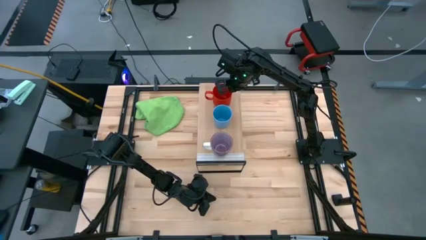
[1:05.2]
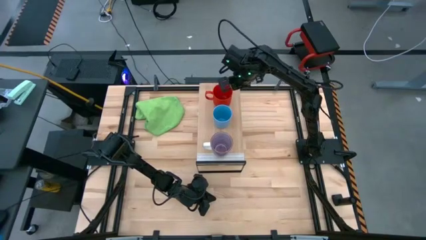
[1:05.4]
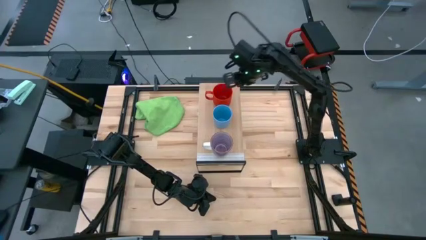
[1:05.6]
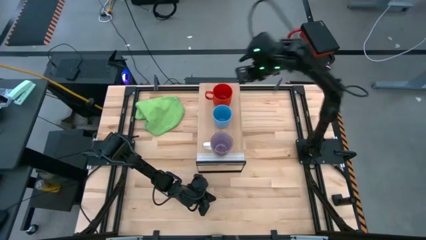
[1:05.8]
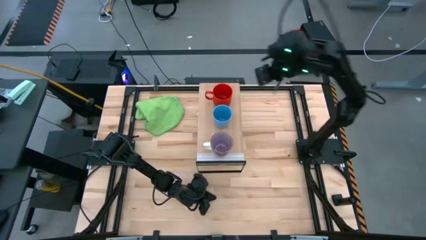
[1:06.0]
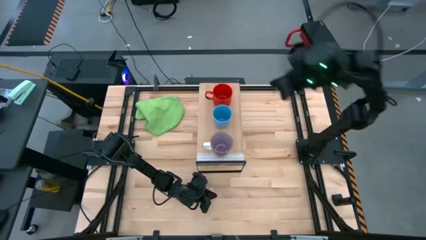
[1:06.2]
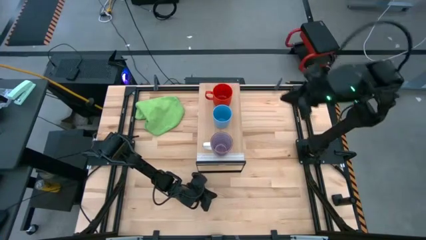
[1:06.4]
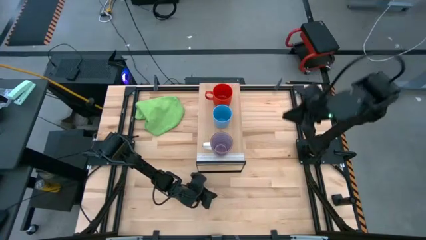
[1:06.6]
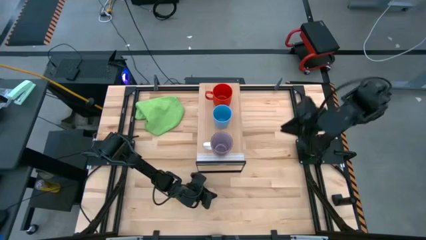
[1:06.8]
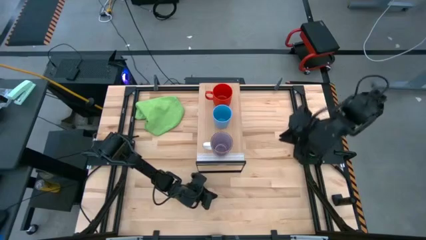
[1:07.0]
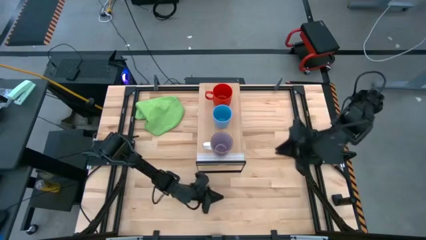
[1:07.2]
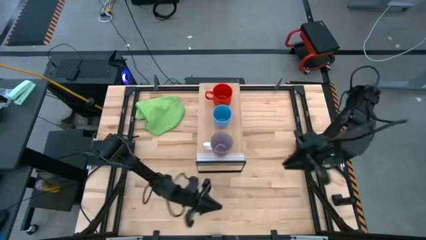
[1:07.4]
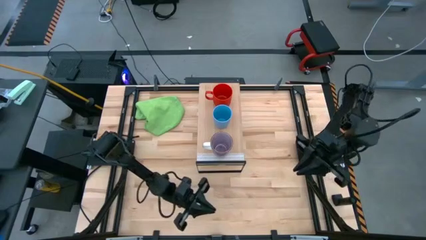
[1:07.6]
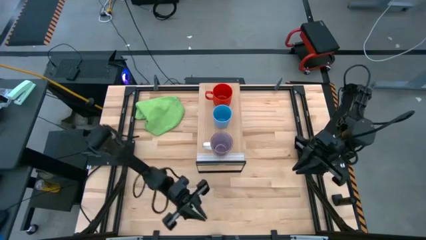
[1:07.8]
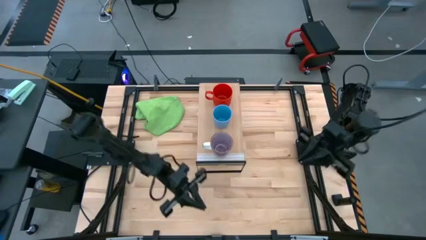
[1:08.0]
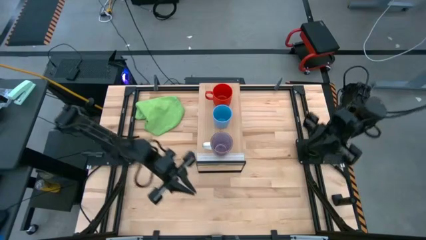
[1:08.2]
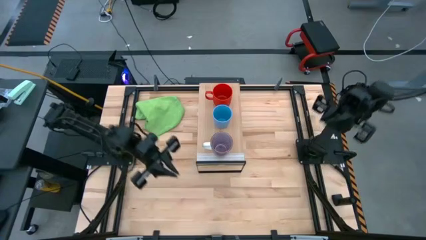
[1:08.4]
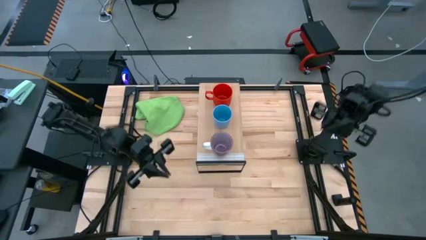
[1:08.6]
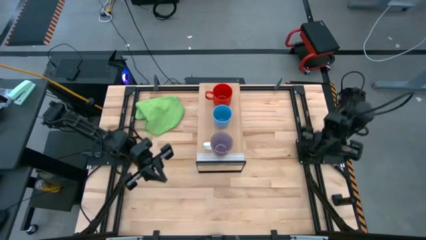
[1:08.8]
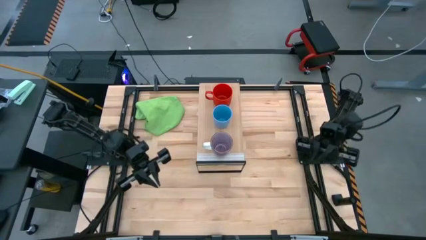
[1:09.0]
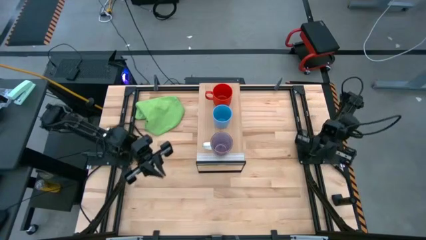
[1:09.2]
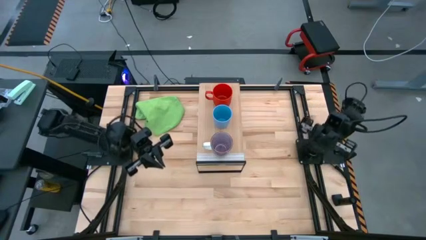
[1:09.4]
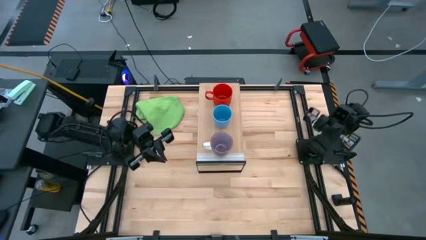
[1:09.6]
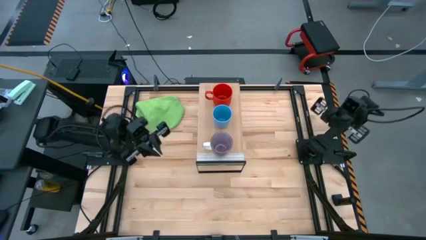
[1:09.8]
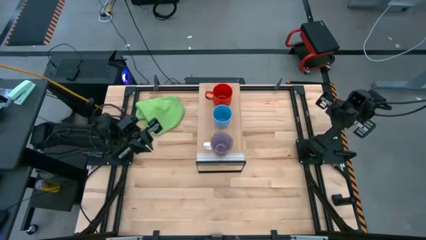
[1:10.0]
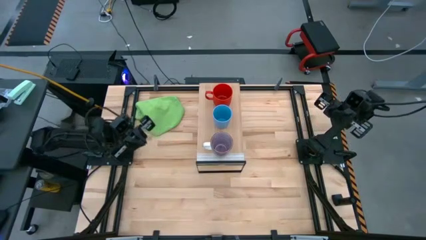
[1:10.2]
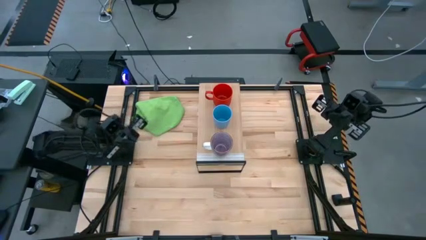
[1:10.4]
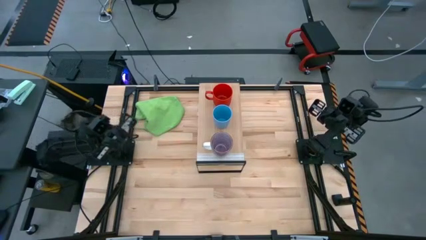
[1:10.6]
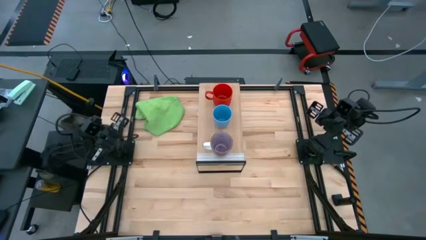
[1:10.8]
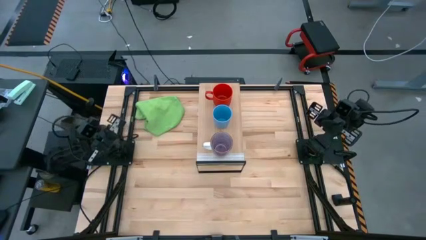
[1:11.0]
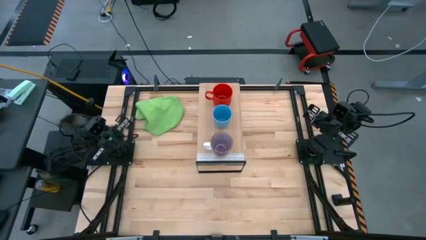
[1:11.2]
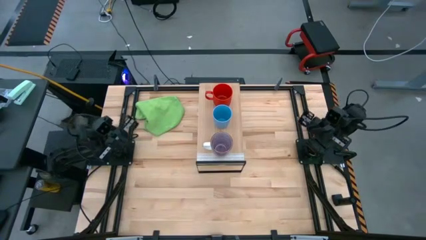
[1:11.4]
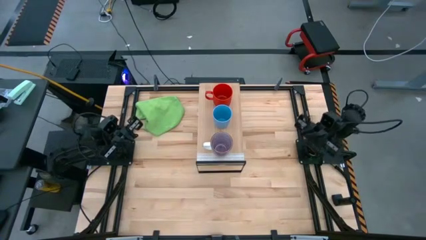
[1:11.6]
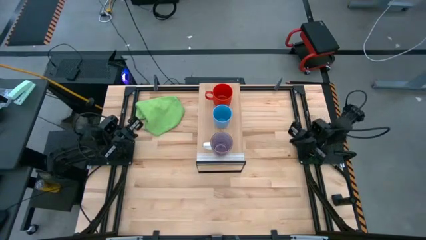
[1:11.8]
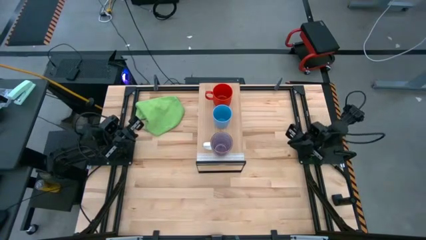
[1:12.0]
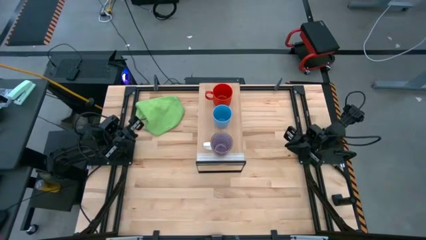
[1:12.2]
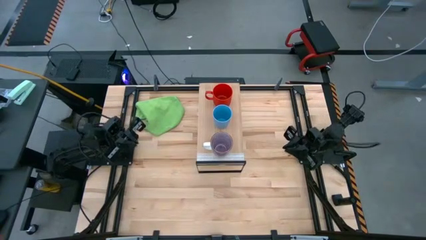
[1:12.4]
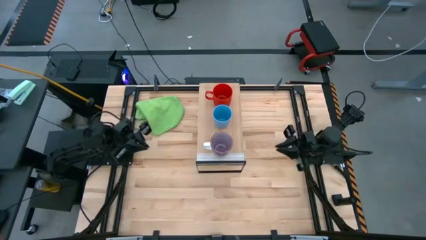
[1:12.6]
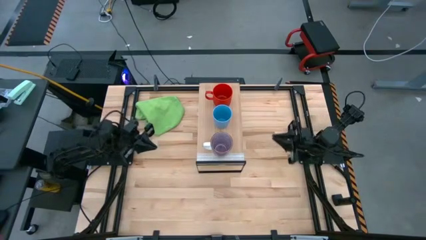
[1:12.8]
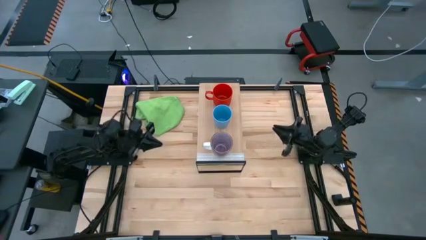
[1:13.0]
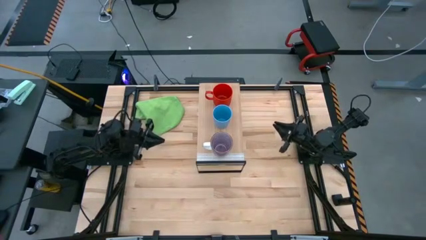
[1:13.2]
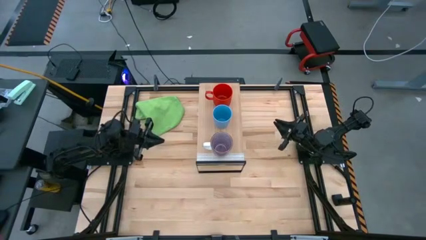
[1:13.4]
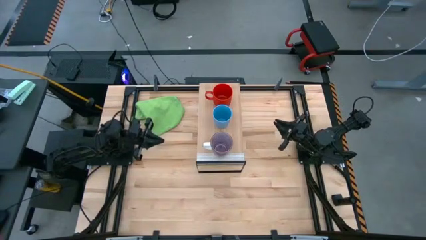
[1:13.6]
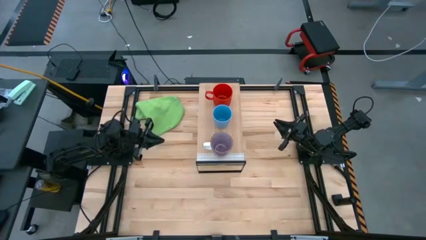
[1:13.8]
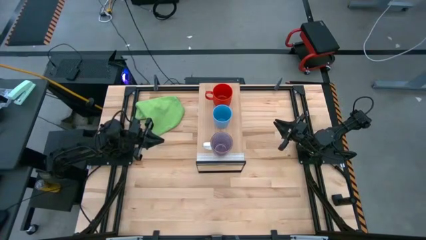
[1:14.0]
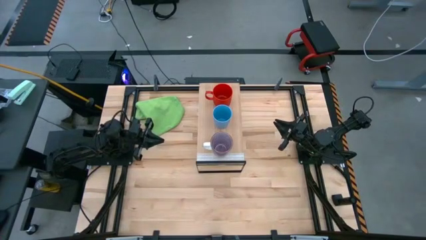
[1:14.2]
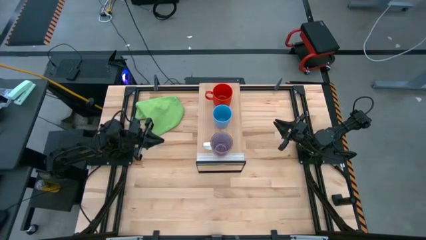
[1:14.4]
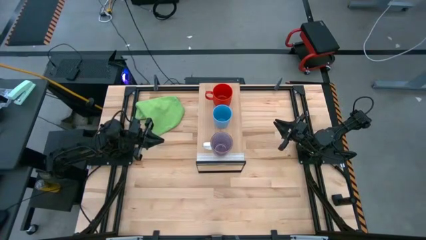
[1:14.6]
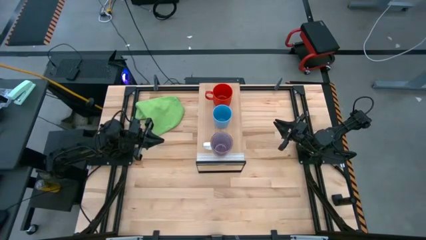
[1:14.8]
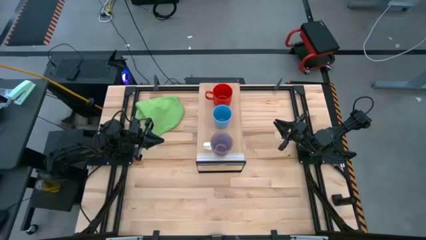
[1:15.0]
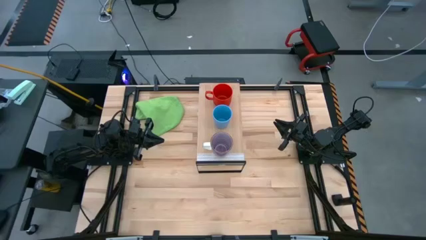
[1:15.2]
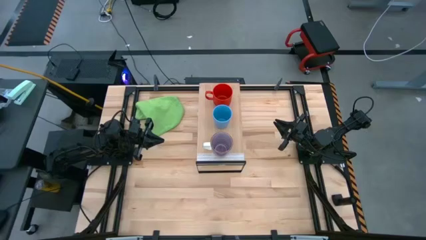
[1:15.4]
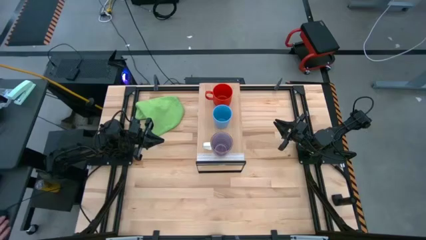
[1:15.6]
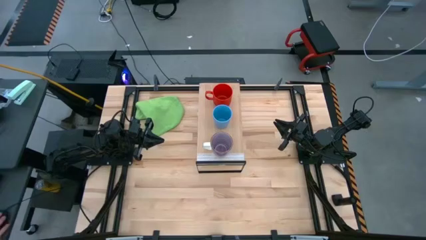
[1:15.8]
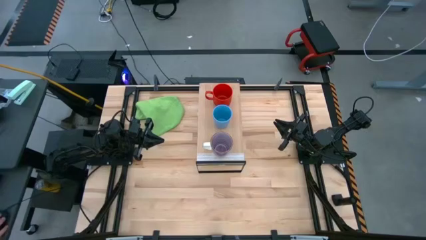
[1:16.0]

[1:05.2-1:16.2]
Task: Stack small to large cups/mugs on shelf
Return to Home Position
